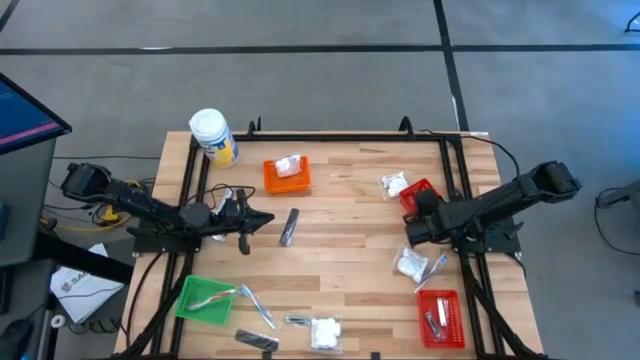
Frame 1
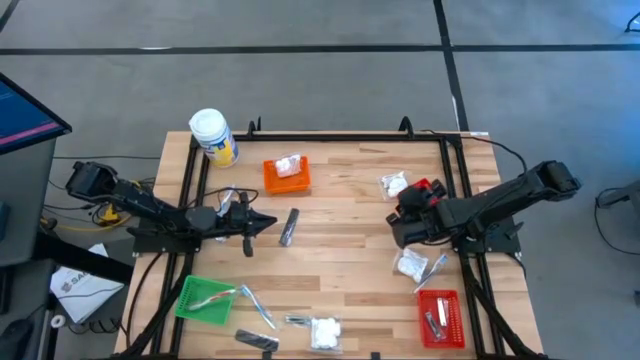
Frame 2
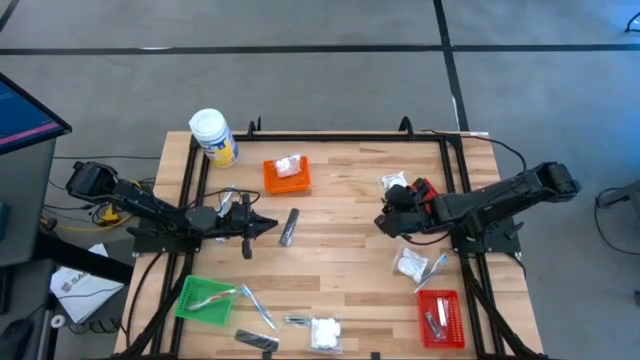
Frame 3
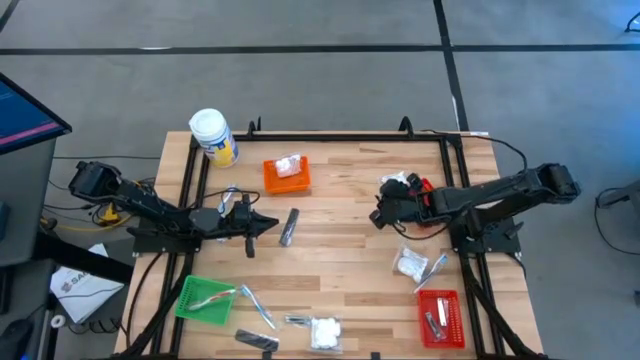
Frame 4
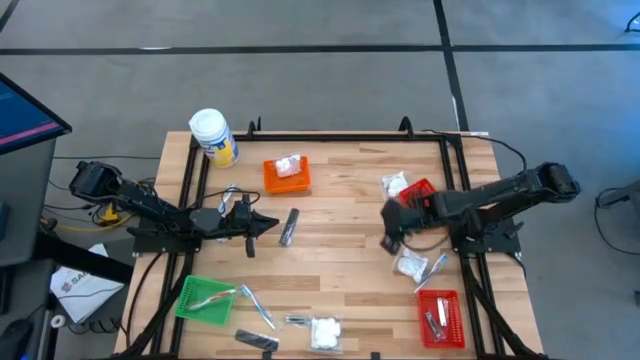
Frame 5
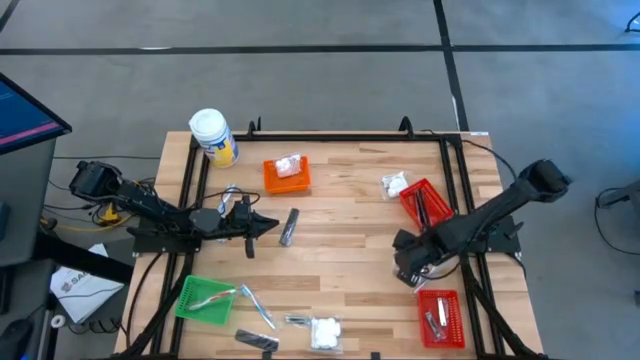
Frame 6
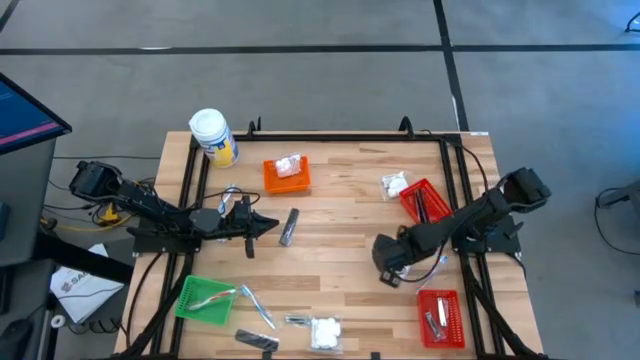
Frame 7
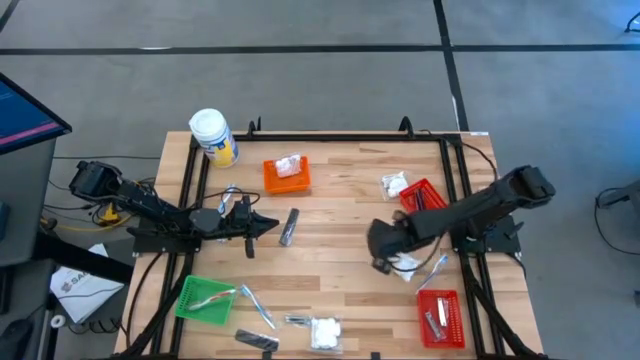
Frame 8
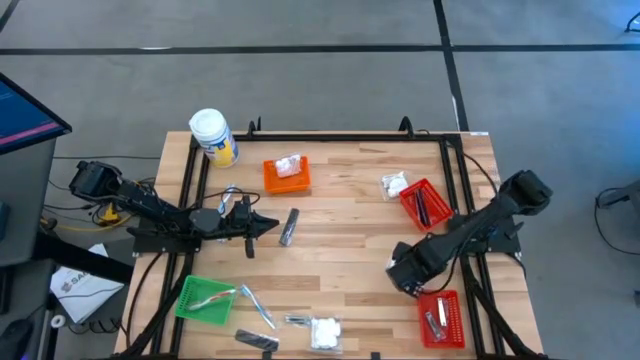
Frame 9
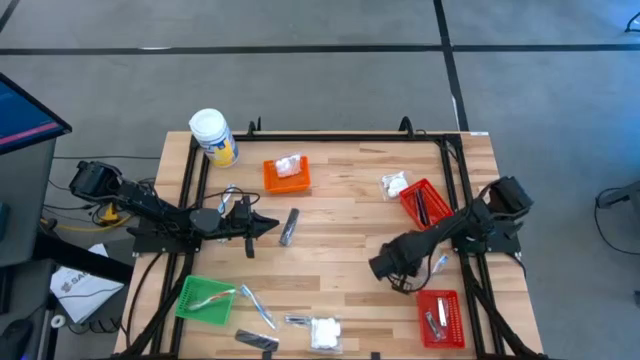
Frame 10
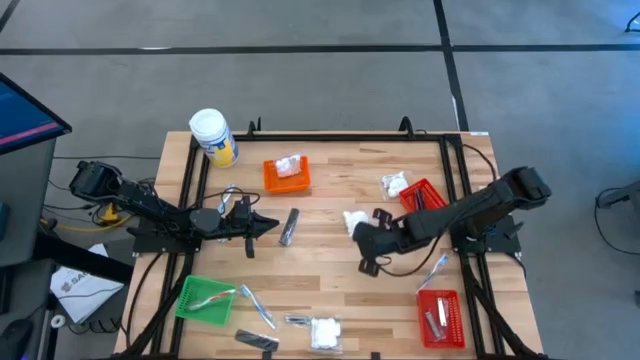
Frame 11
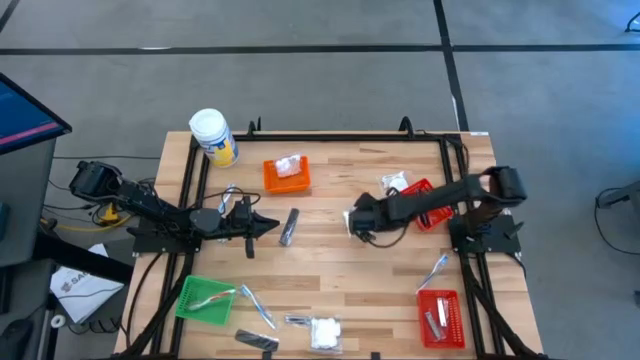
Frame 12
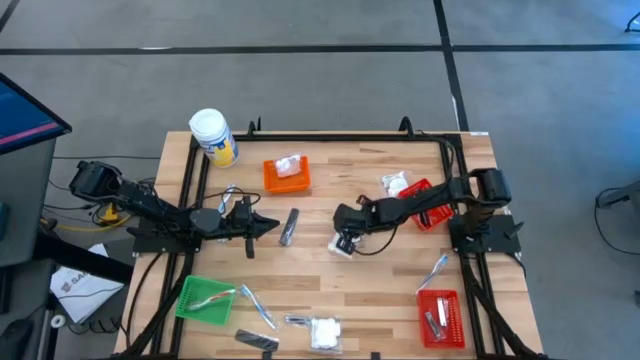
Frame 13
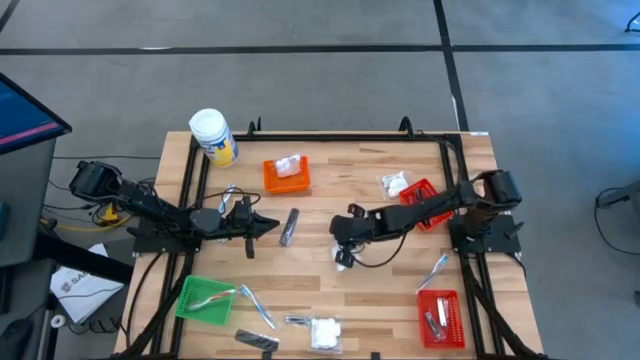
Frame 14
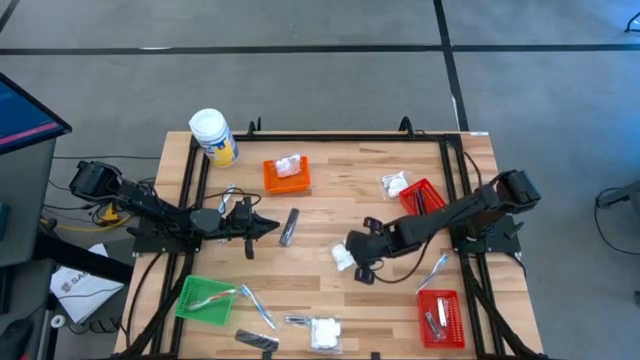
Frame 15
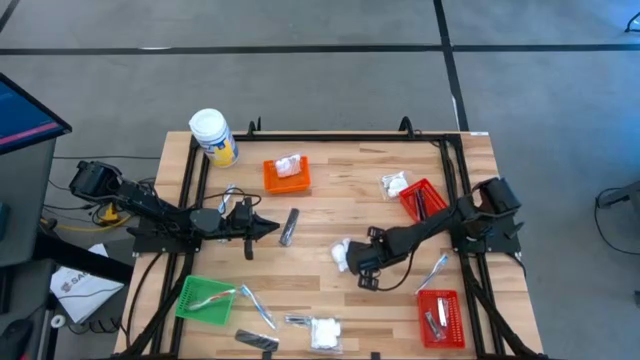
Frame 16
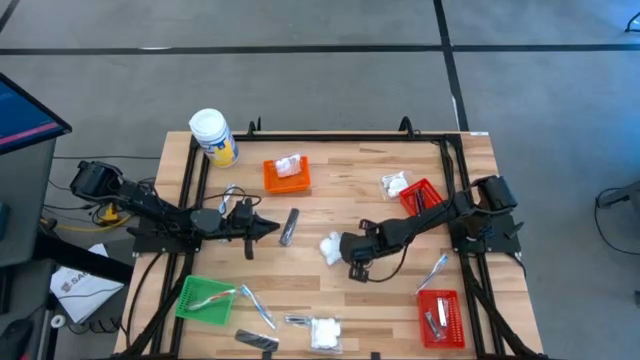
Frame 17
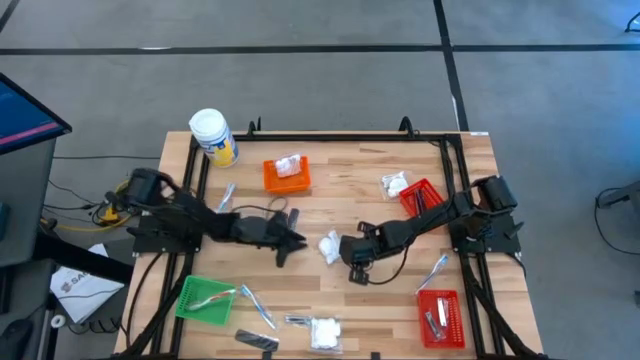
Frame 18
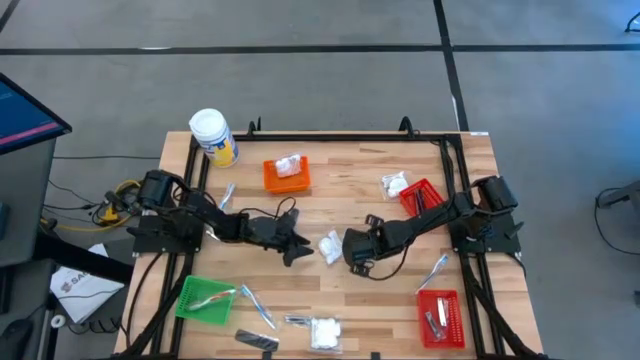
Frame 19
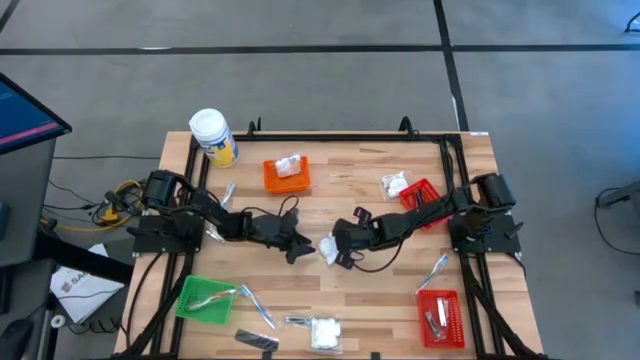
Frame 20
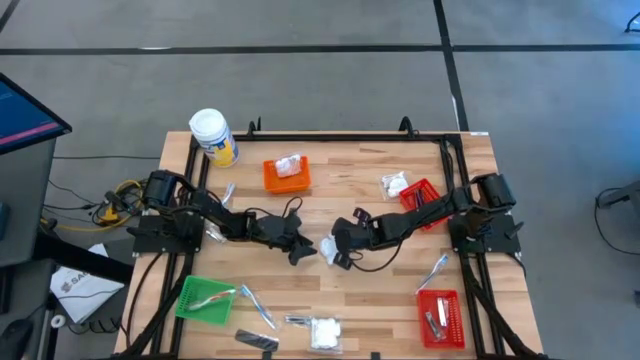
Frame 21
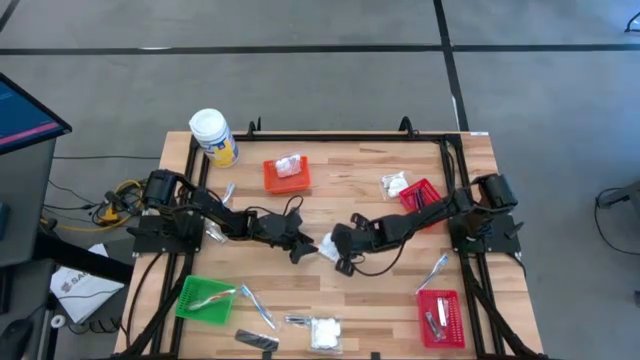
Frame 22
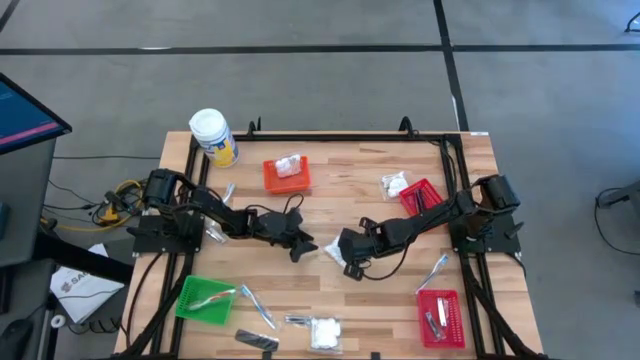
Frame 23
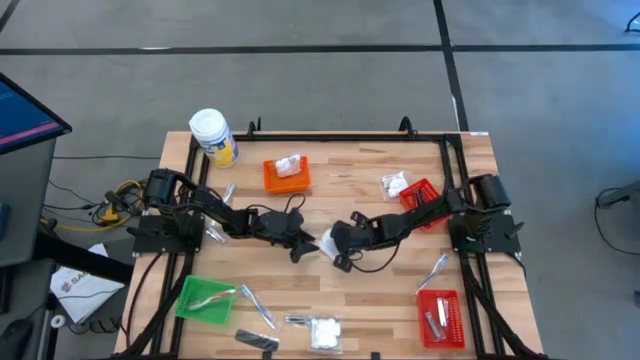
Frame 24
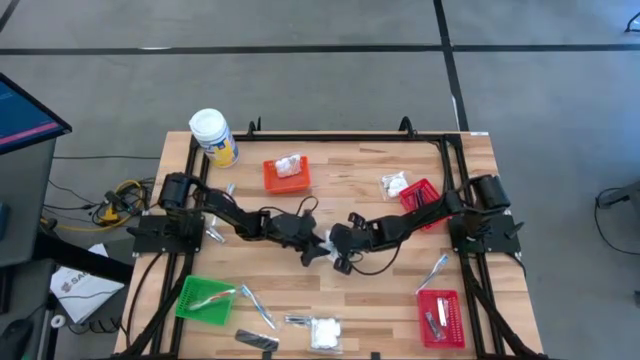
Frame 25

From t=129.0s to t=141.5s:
Task: Pick & Place Travel size toiletries
Put the white cotton pack into the orange basket

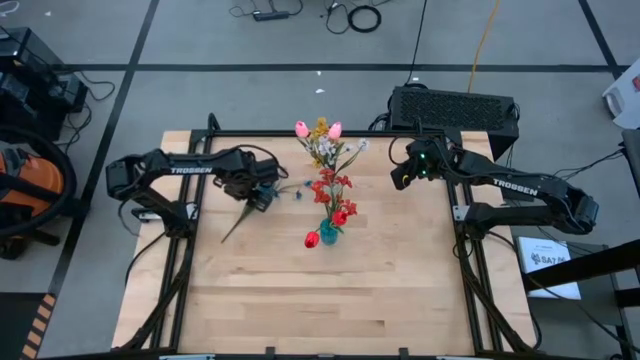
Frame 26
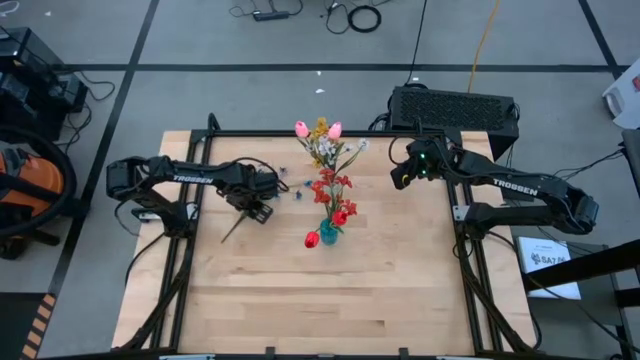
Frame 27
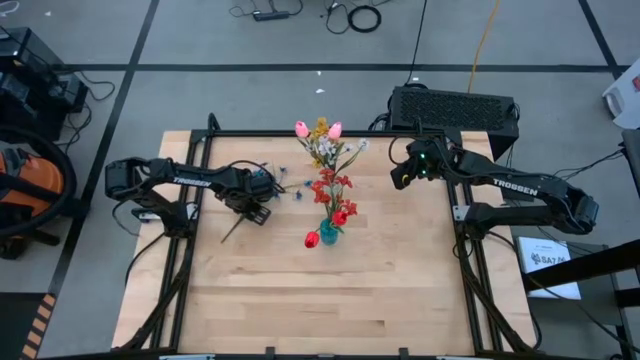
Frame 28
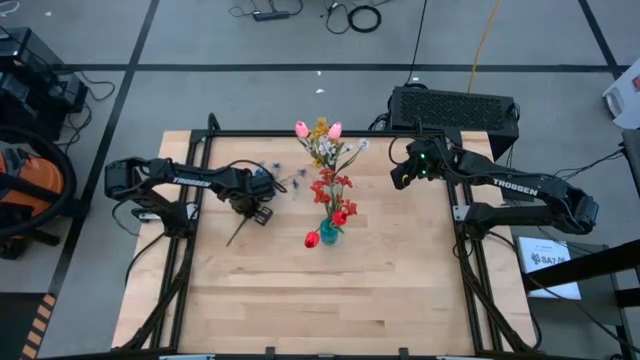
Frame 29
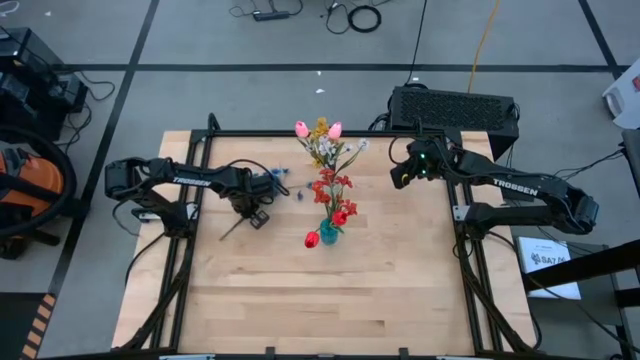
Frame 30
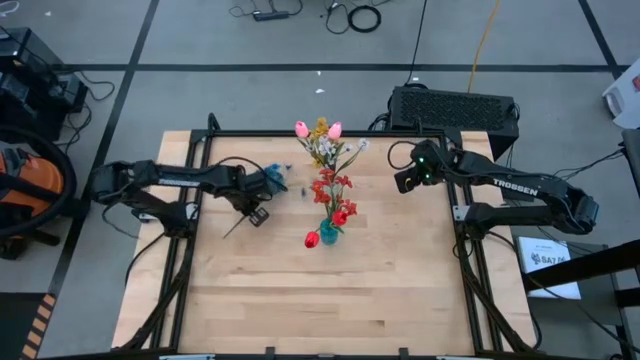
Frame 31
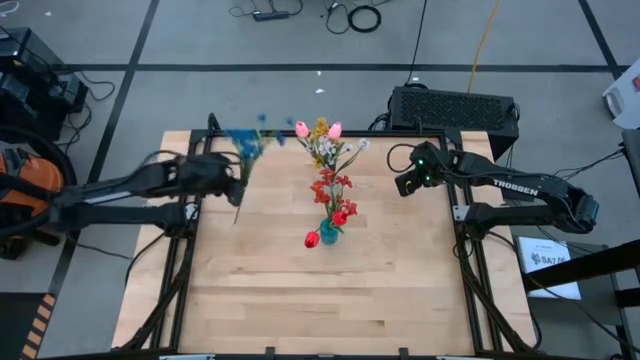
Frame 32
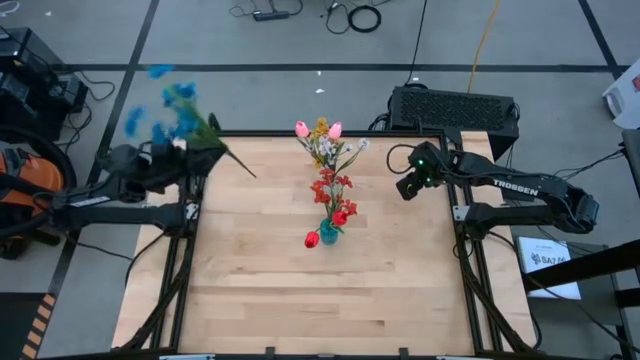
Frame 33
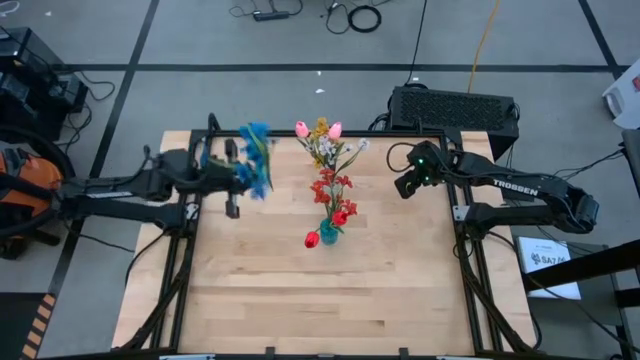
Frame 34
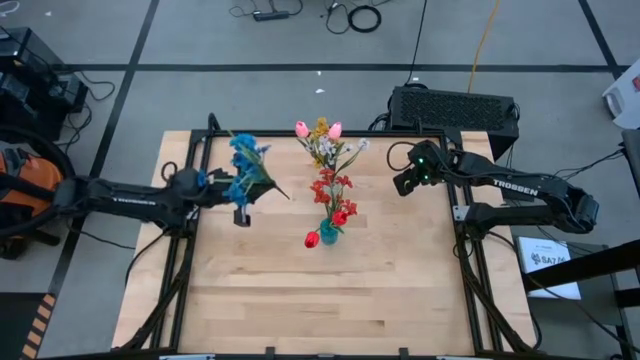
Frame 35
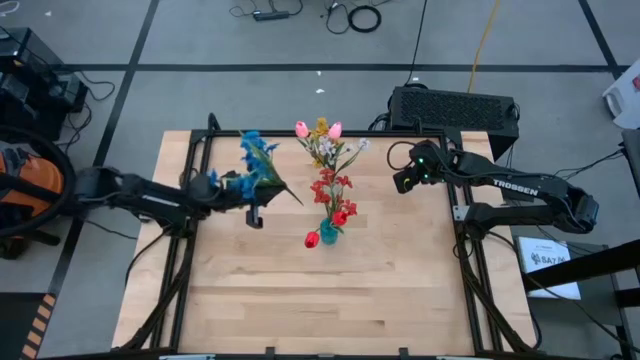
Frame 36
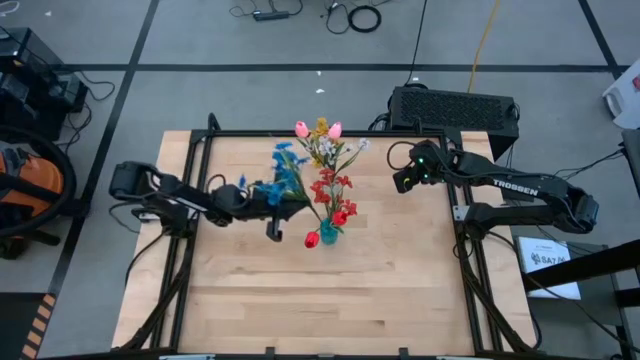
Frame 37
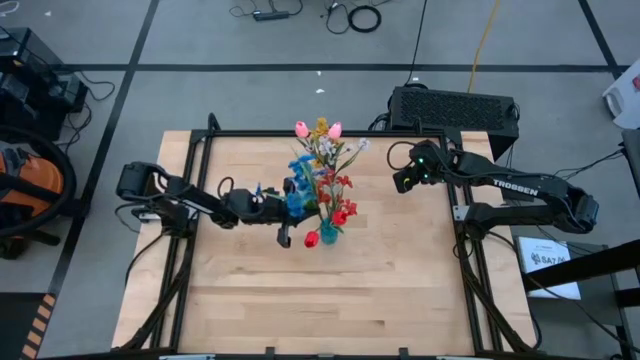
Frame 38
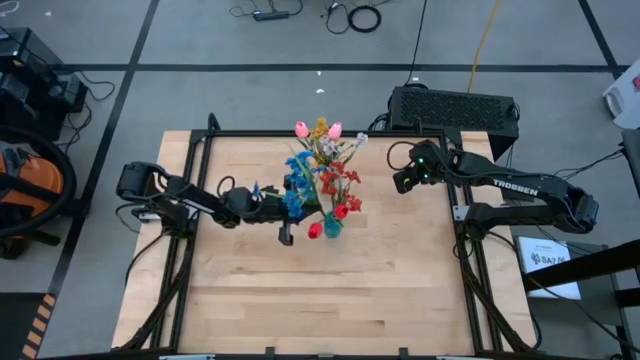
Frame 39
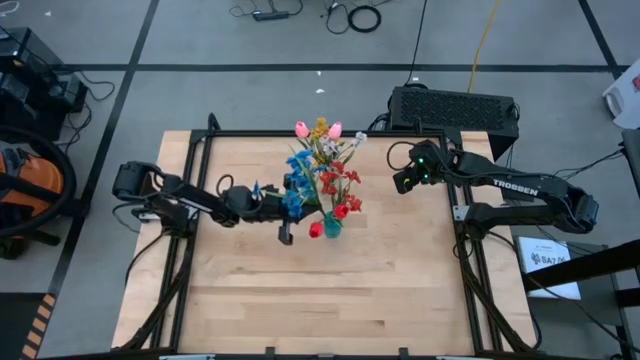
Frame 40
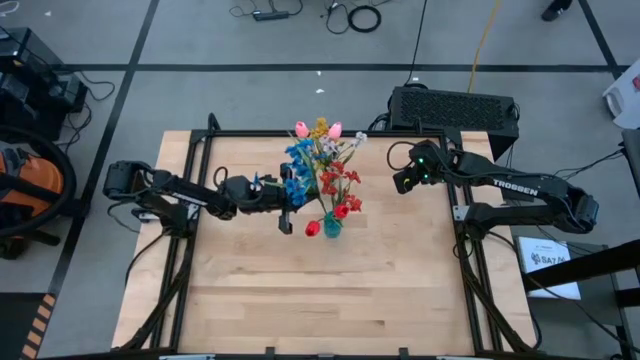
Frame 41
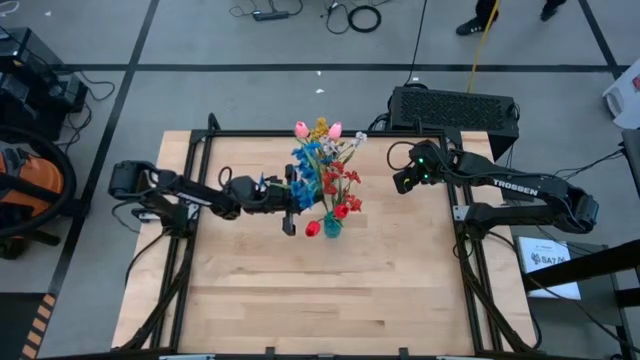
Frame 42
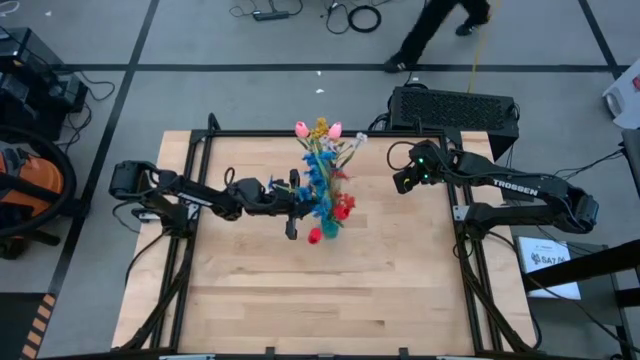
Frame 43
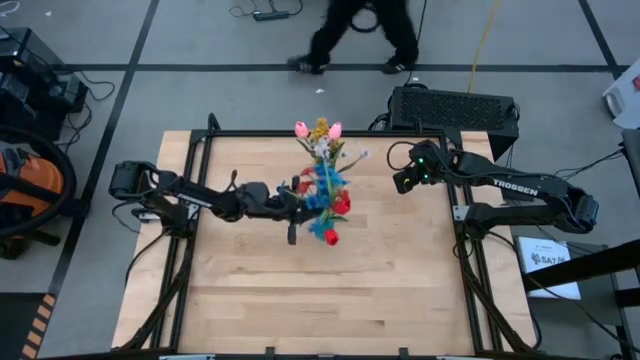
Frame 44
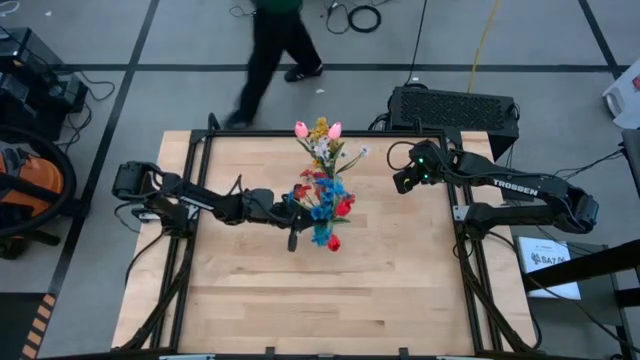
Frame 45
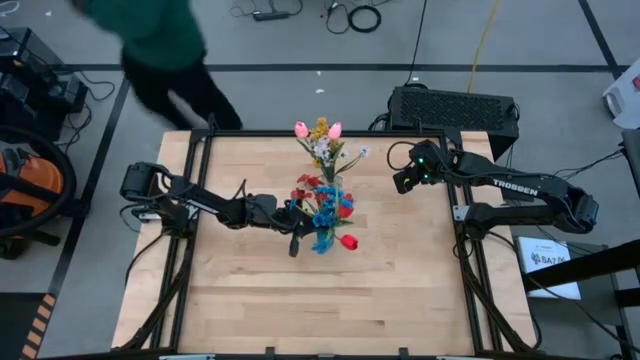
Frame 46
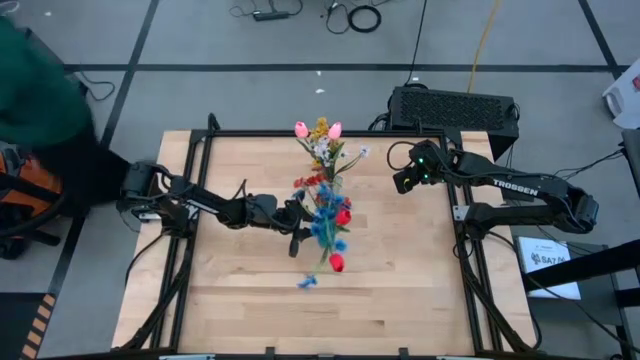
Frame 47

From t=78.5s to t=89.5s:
Task: Sort flowers into vase by color
Put the blue flowers into the blue vase
